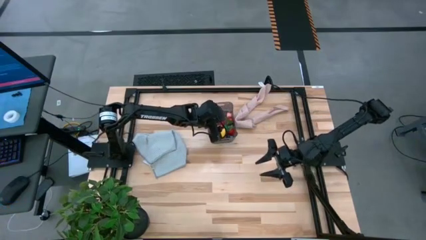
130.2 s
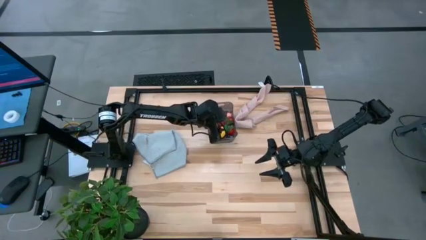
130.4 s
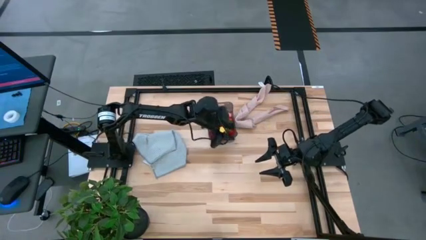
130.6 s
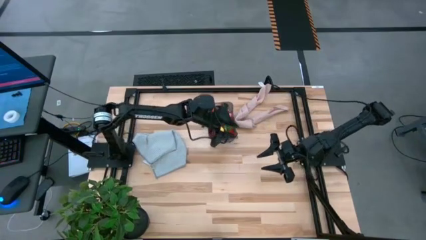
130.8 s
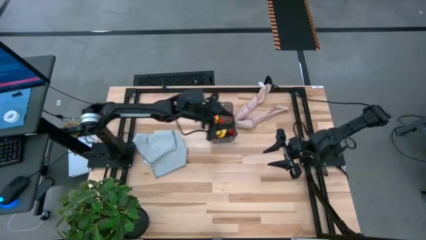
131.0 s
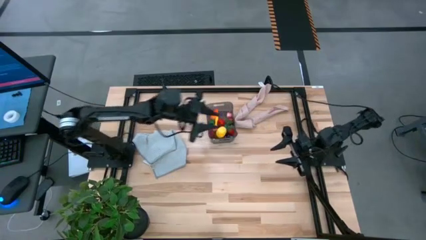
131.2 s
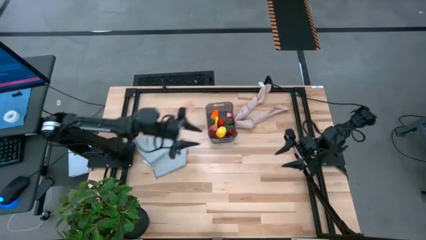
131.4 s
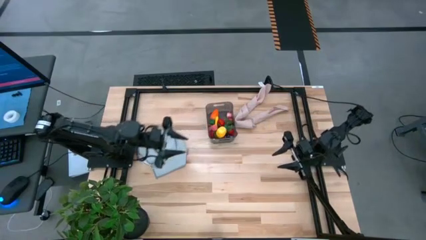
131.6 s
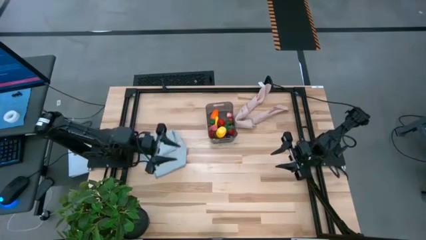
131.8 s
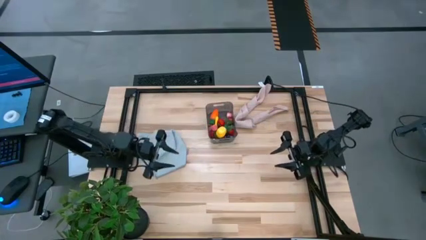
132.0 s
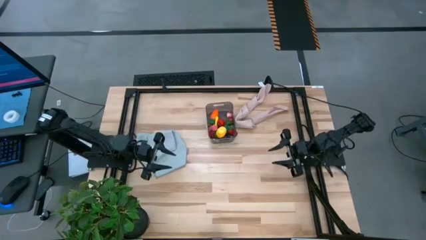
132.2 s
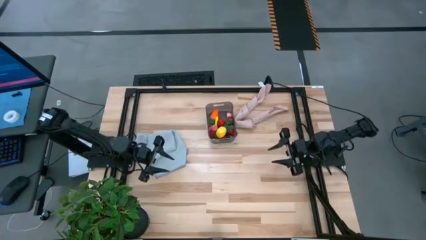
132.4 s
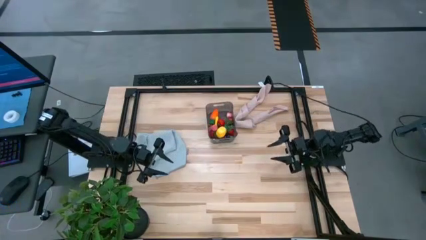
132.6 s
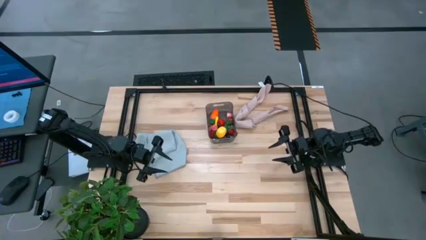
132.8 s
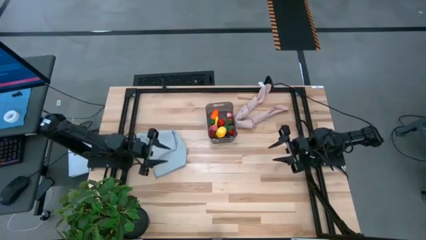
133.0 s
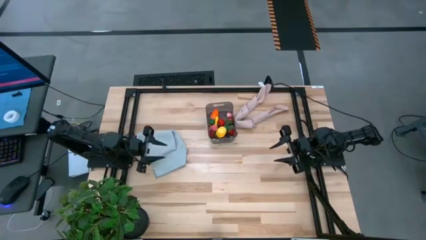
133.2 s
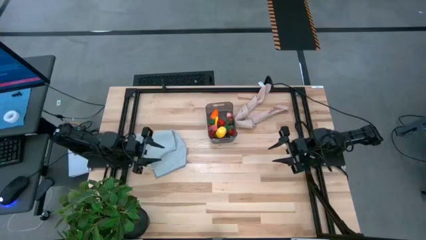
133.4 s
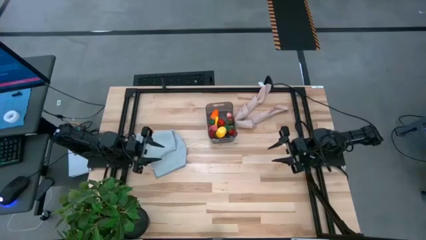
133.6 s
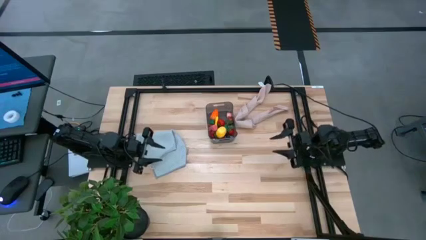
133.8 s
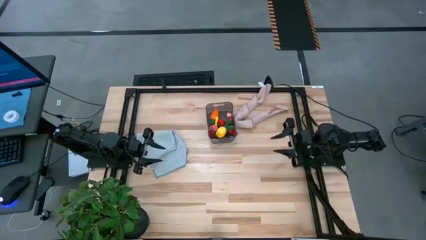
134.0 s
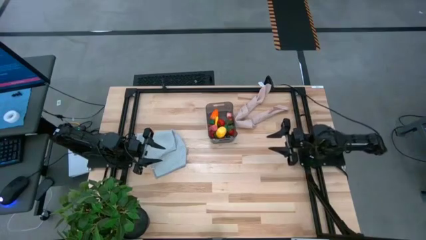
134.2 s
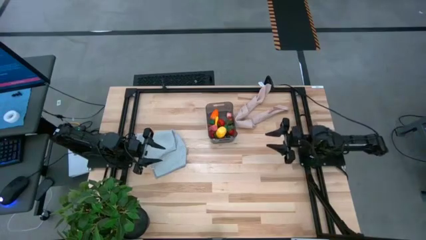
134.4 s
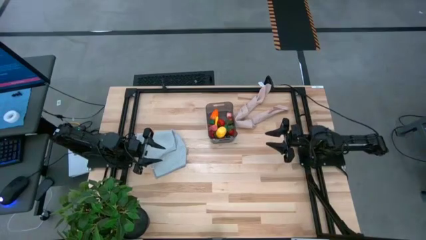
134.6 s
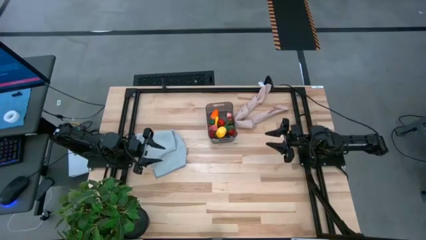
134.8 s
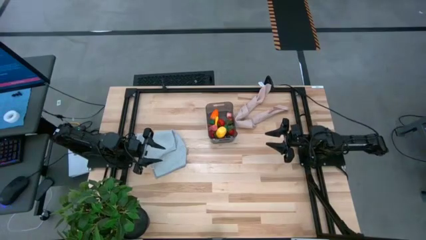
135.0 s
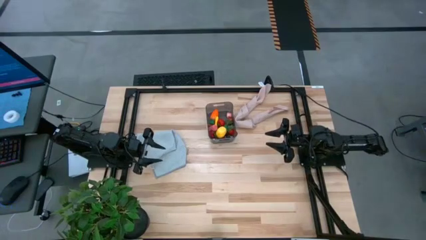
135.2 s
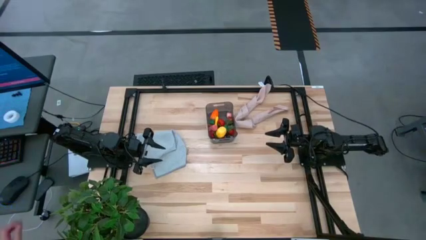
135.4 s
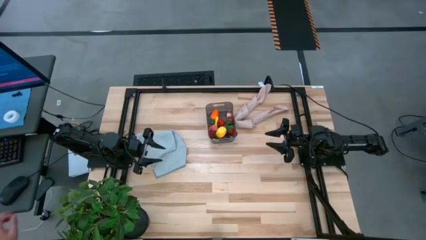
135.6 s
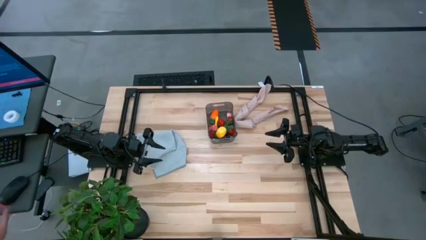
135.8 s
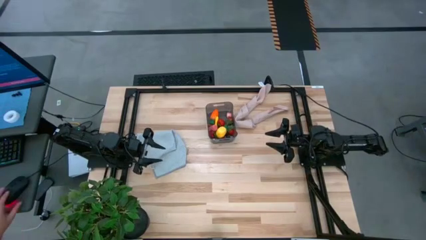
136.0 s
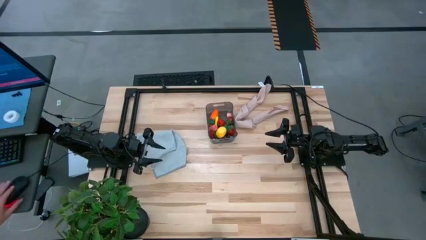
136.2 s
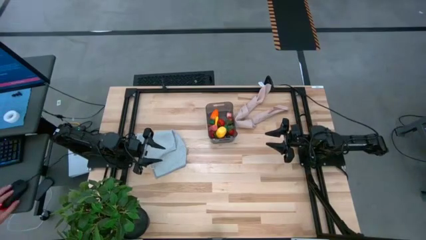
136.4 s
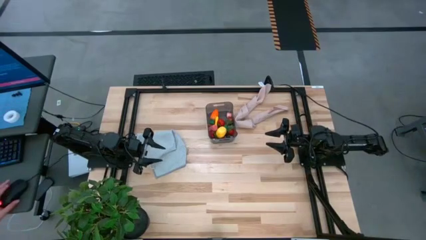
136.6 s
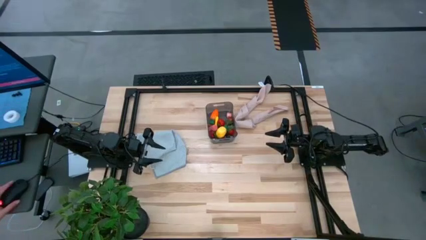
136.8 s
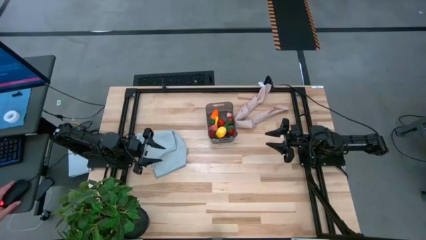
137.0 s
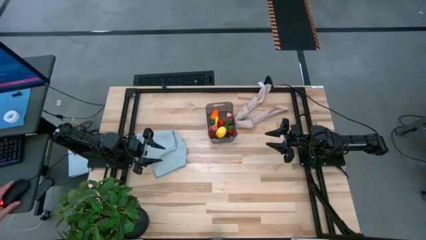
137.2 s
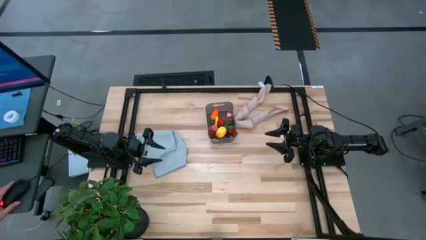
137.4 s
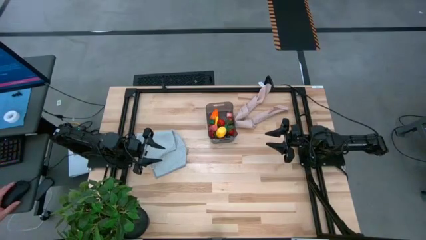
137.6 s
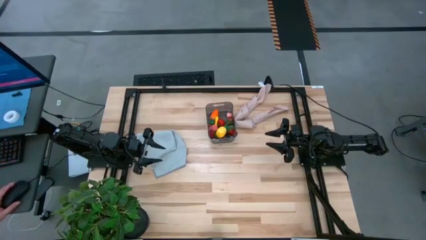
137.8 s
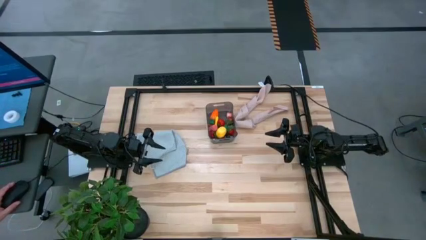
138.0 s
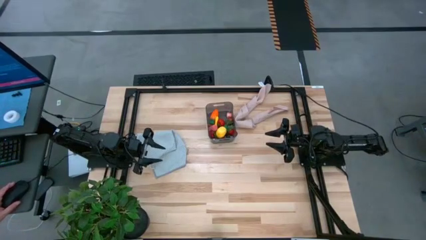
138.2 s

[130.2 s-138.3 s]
Task: Pick and placing Produce into tupperware
Return to Home Position

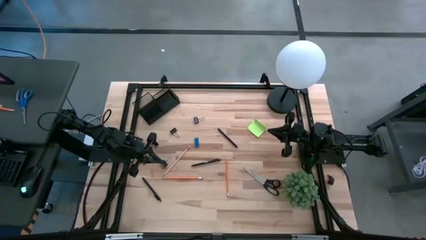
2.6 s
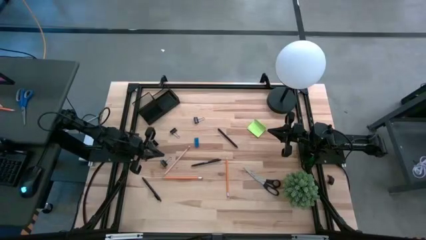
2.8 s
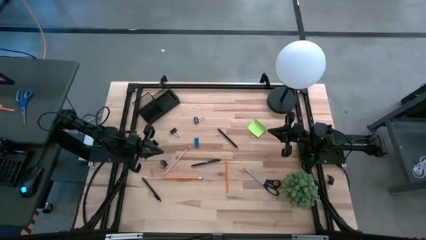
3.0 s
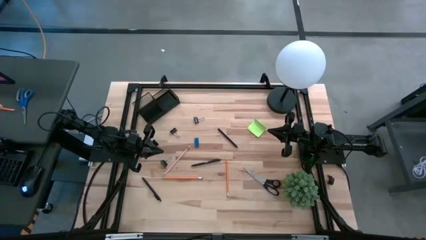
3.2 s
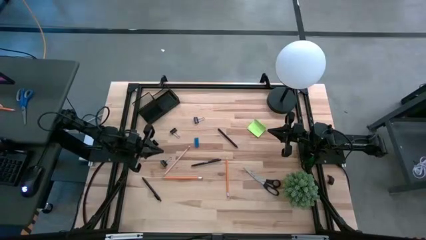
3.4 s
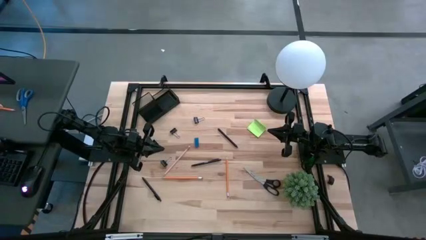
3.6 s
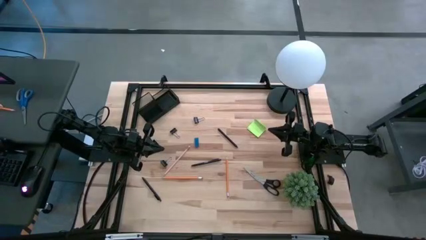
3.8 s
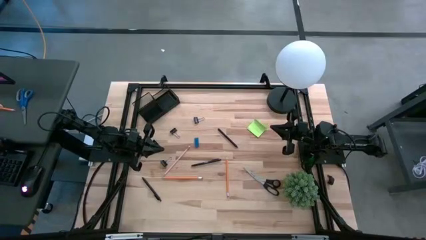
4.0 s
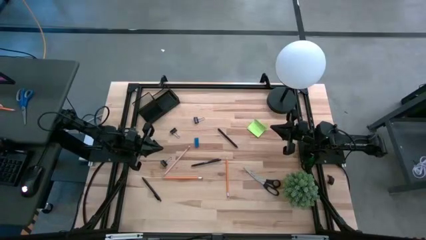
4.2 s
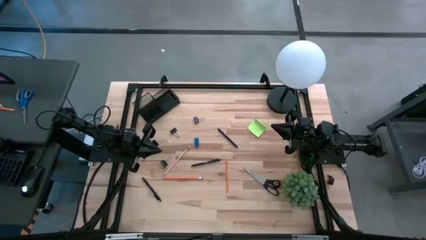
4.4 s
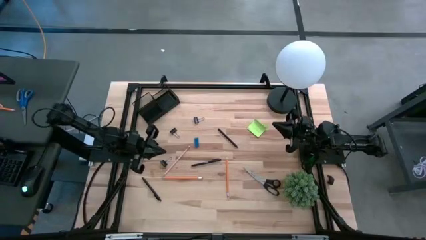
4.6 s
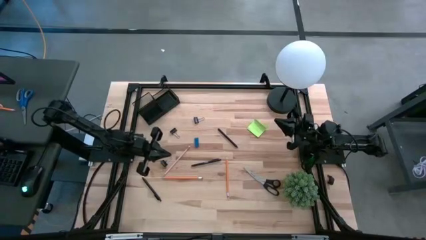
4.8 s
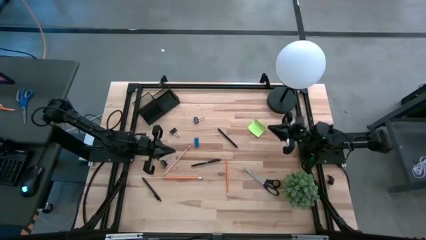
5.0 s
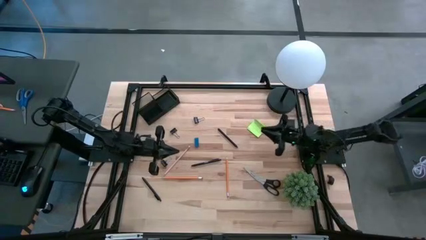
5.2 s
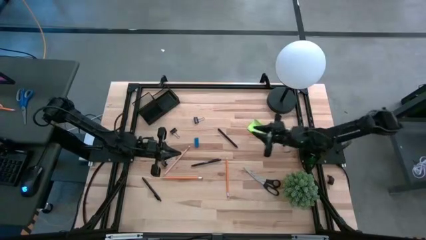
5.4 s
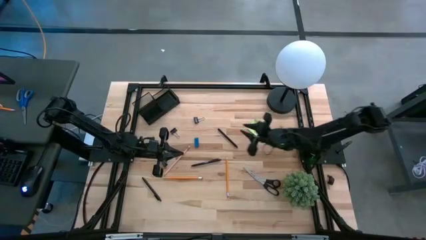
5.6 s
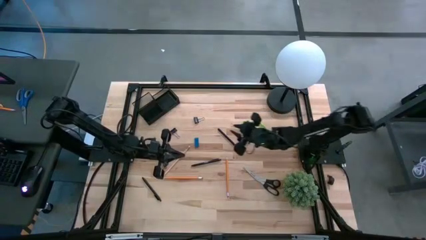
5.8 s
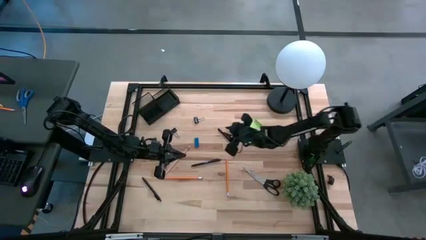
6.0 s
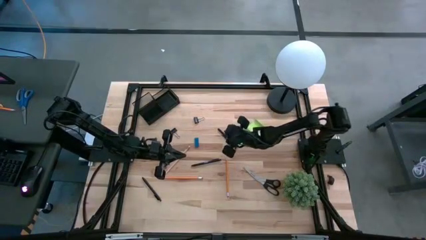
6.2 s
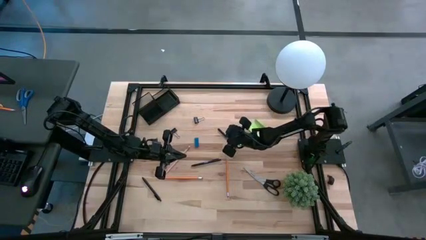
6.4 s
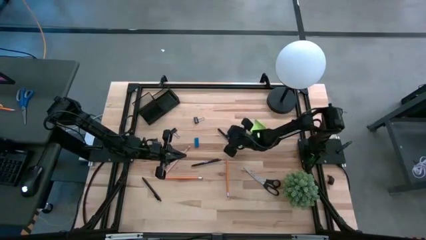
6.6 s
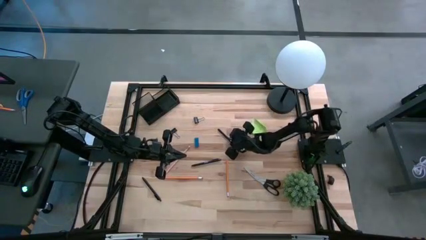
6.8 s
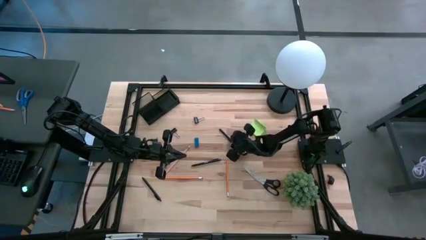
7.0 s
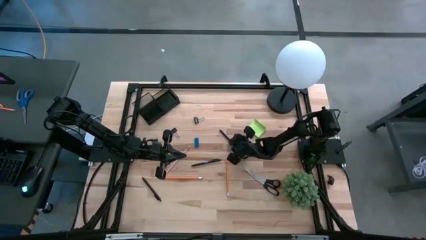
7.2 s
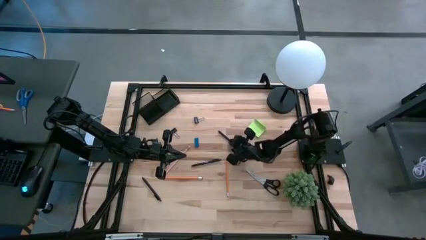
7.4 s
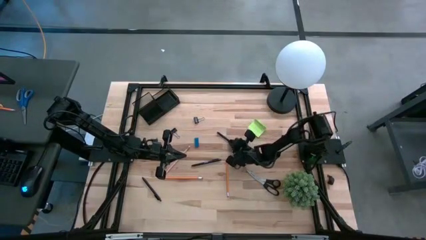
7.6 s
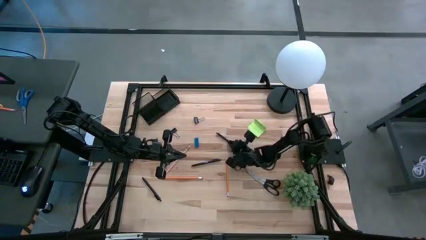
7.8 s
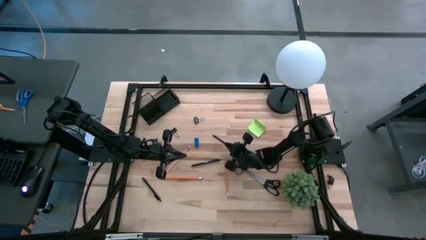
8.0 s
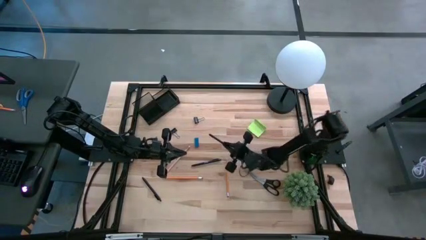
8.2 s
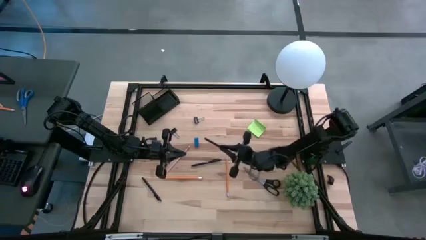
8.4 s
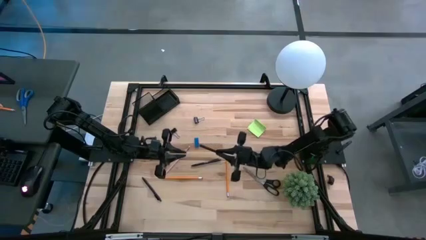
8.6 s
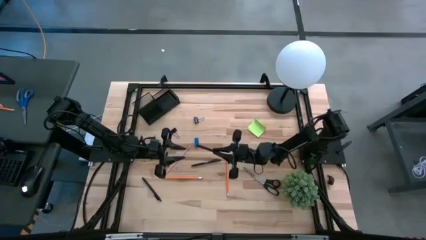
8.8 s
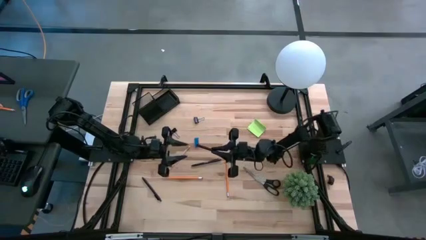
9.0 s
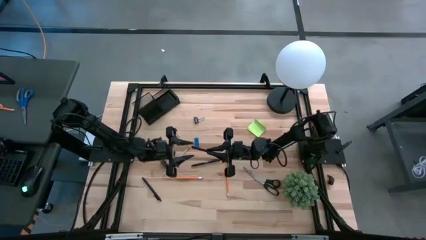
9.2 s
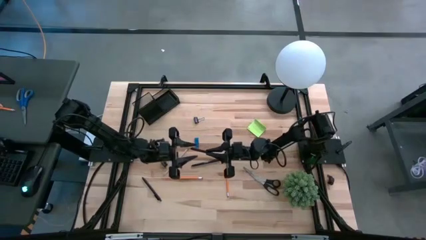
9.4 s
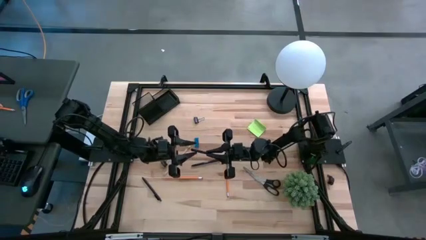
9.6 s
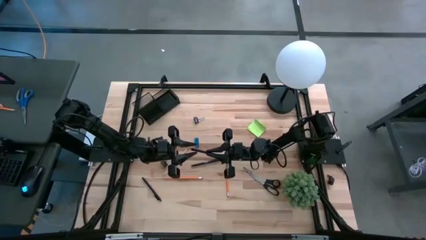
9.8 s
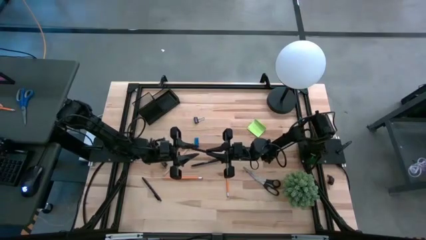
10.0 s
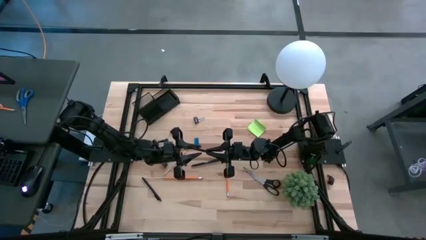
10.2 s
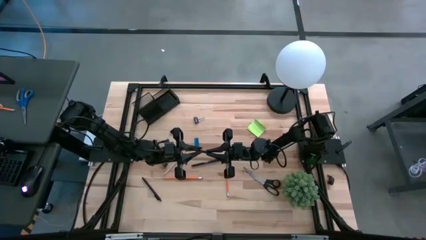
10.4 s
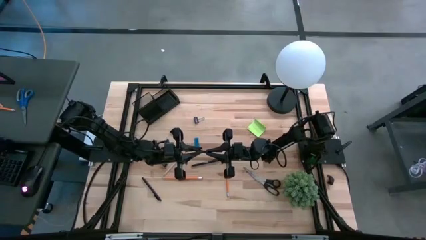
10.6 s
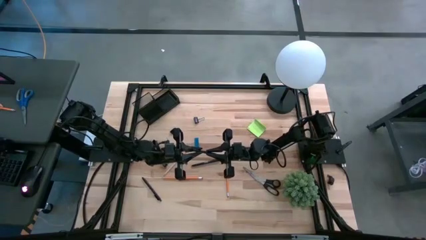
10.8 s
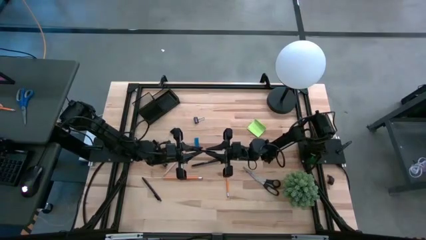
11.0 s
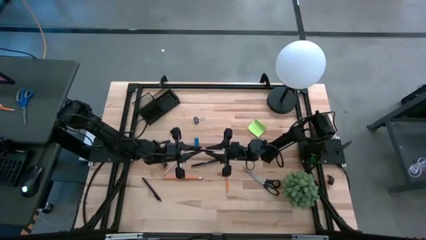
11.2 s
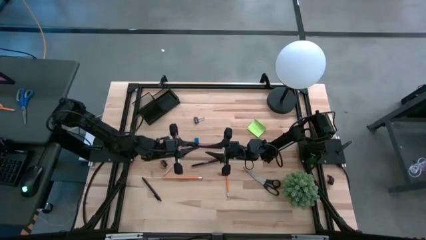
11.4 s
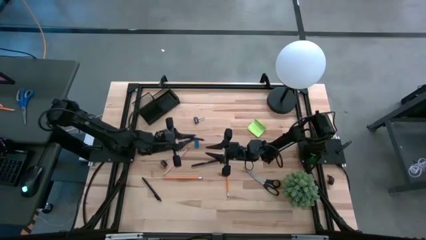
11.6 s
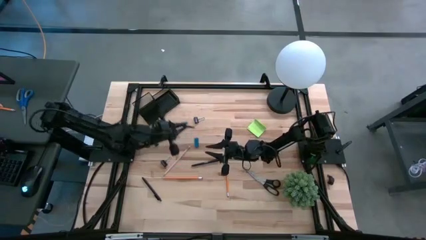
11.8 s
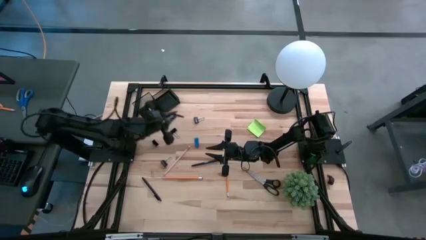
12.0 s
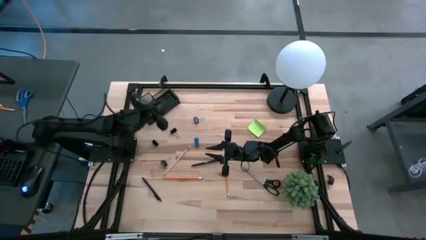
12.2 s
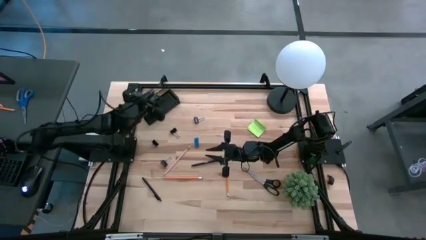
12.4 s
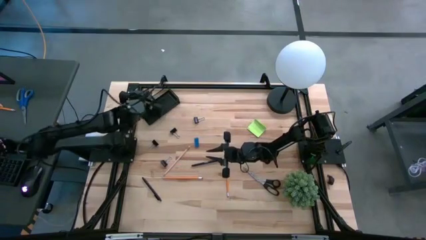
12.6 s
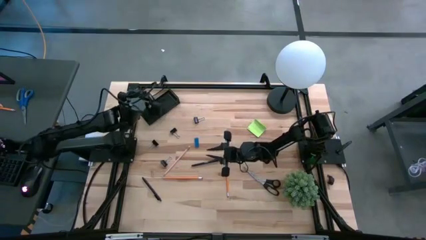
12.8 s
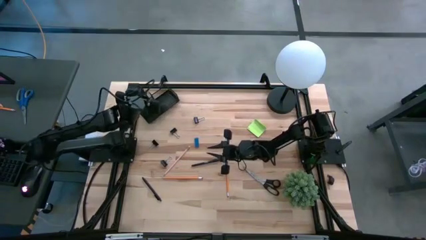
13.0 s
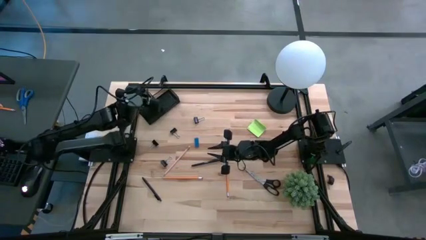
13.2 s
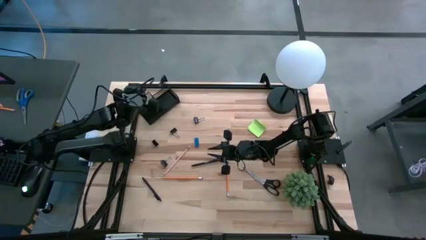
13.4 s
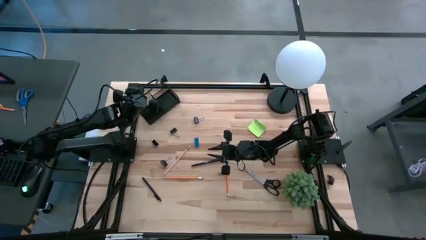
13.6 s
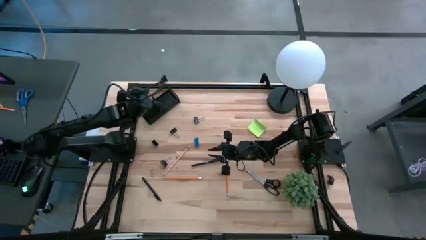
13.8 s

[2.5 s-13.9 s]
Task: Pick and place office supplies into organizer
Put the black pen into the top left section of the desk organizer
